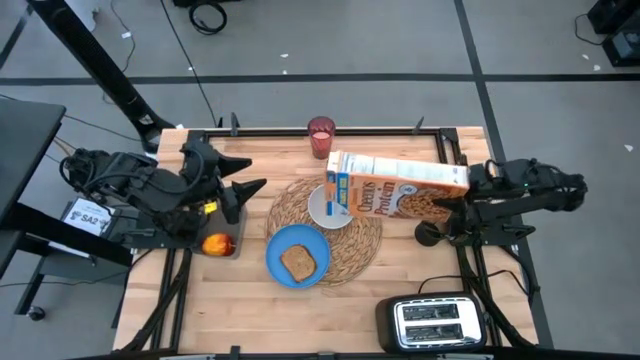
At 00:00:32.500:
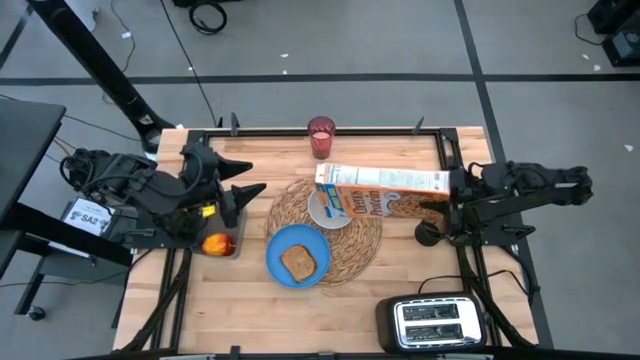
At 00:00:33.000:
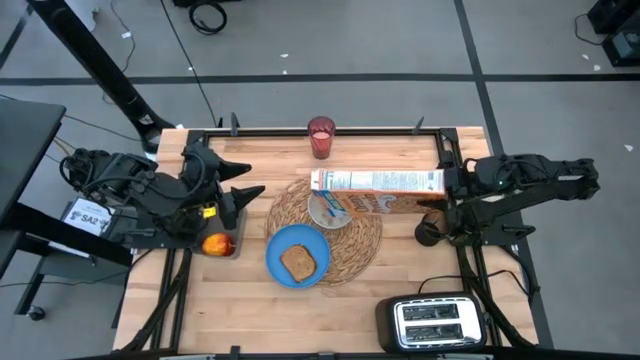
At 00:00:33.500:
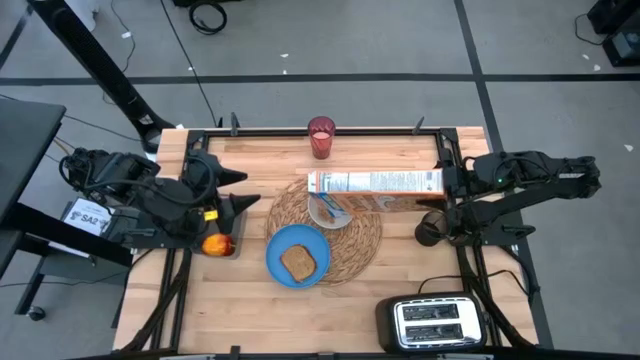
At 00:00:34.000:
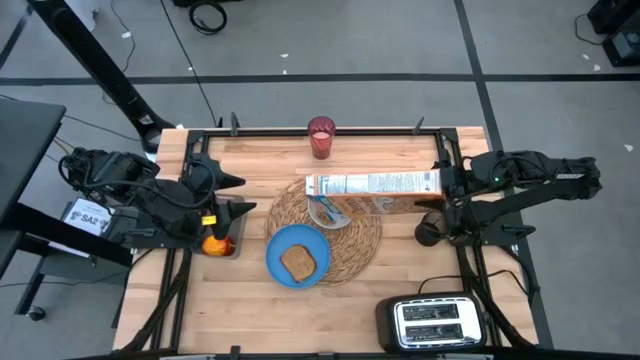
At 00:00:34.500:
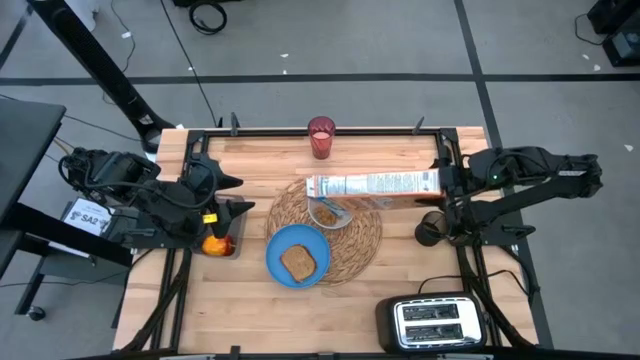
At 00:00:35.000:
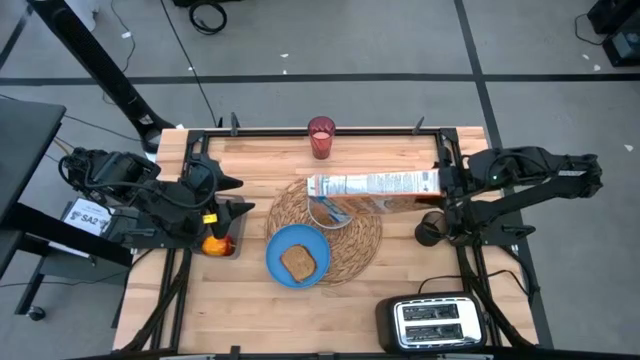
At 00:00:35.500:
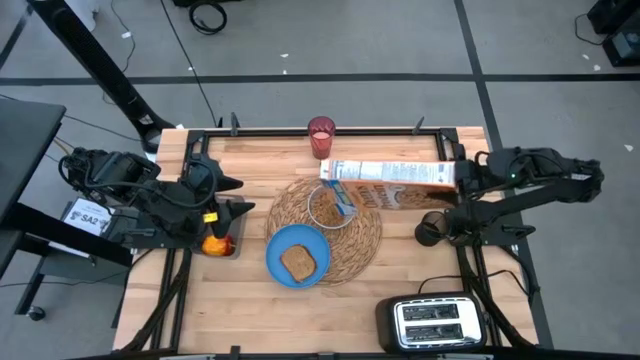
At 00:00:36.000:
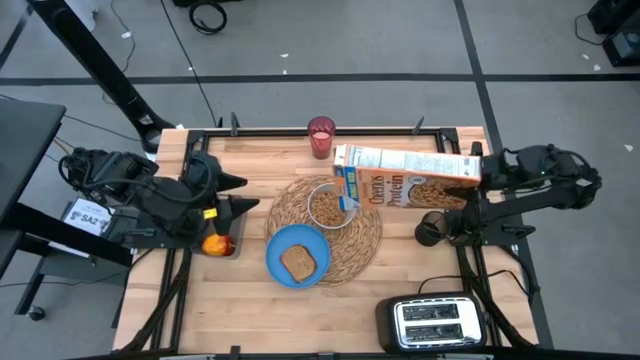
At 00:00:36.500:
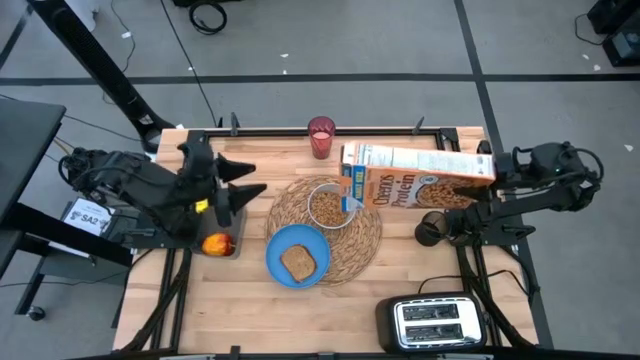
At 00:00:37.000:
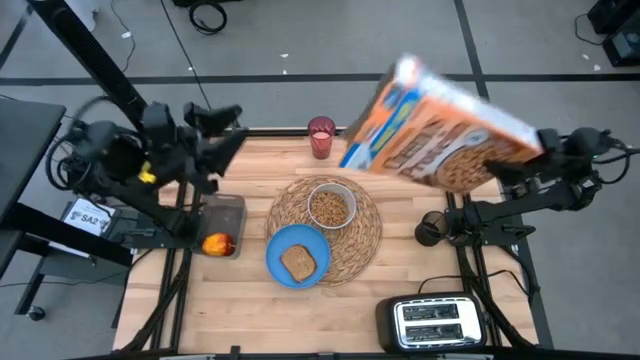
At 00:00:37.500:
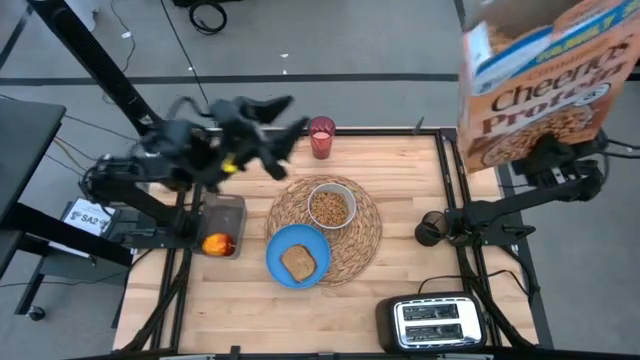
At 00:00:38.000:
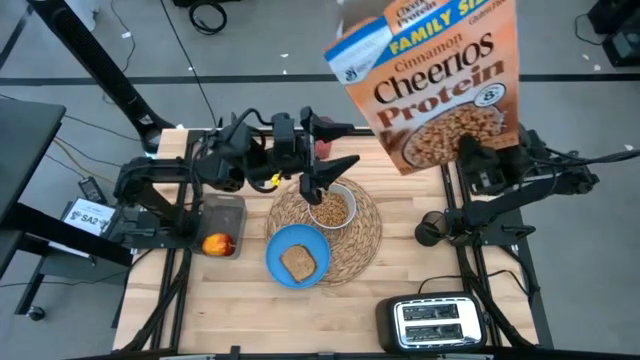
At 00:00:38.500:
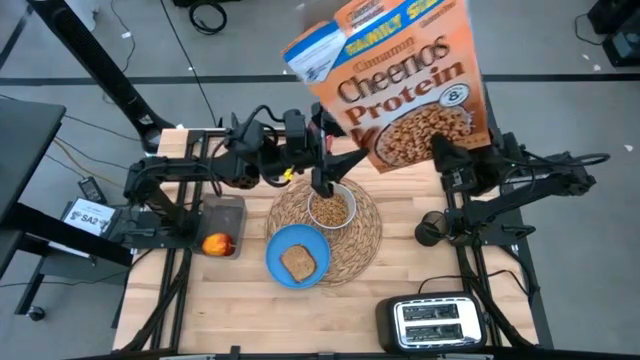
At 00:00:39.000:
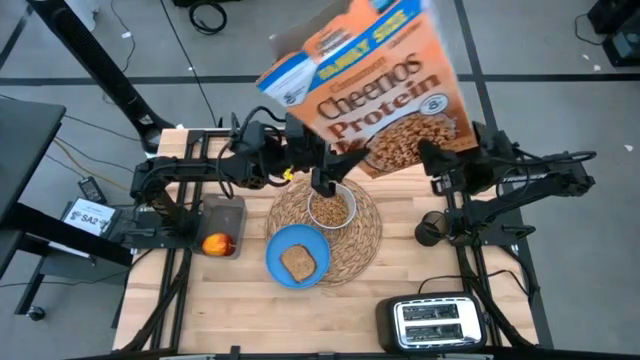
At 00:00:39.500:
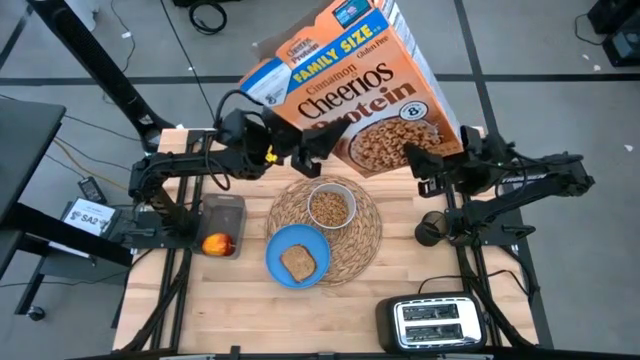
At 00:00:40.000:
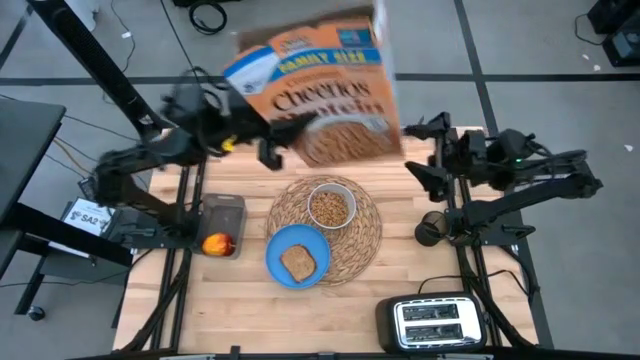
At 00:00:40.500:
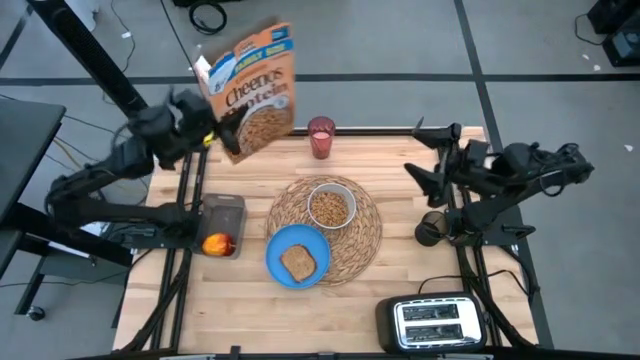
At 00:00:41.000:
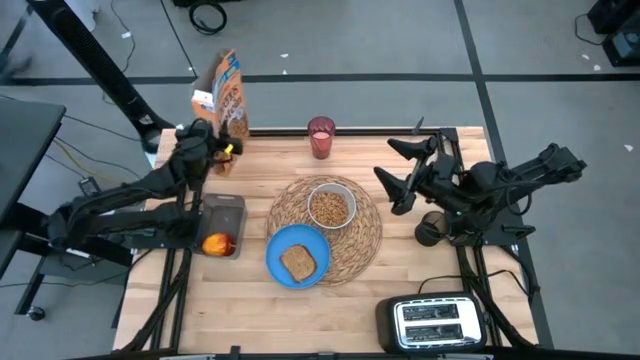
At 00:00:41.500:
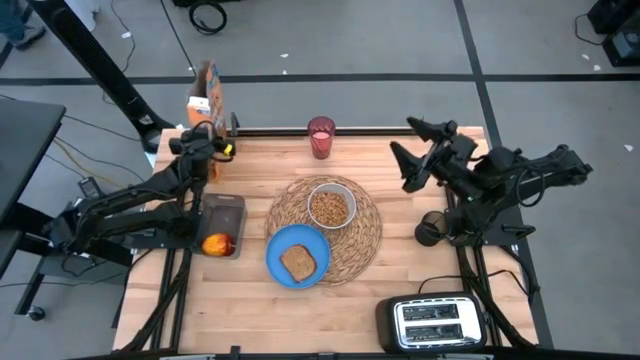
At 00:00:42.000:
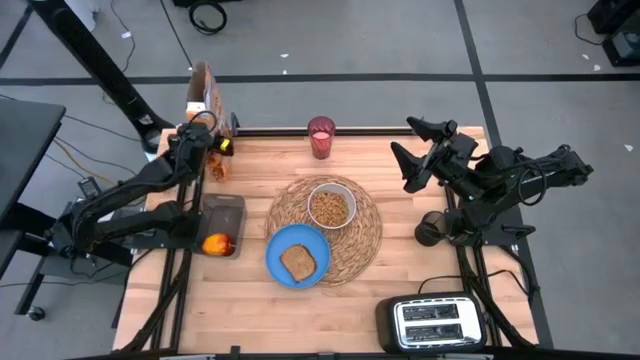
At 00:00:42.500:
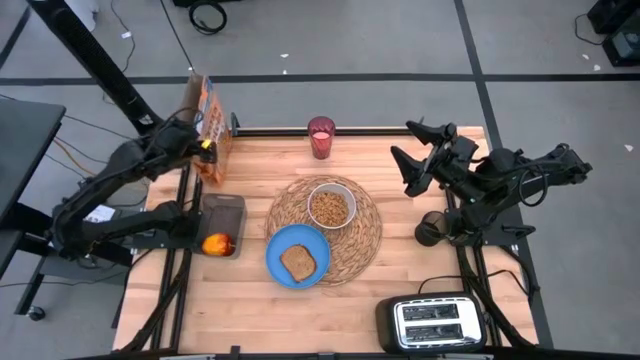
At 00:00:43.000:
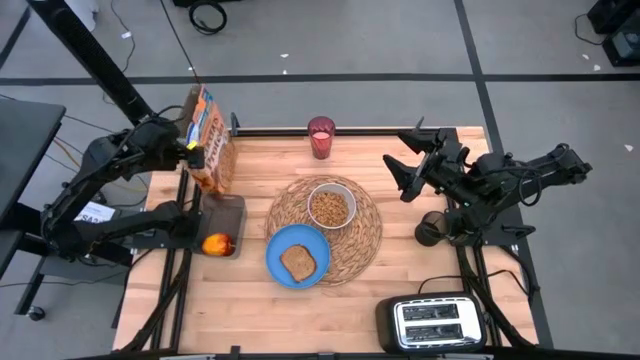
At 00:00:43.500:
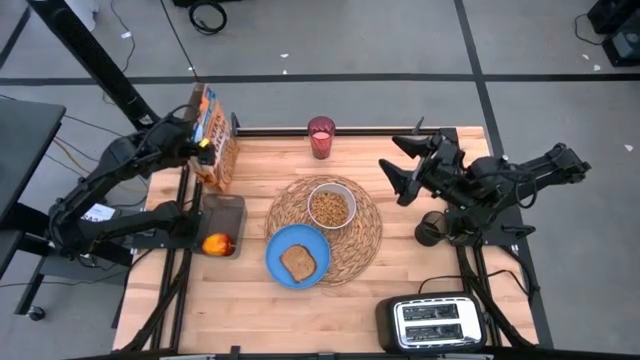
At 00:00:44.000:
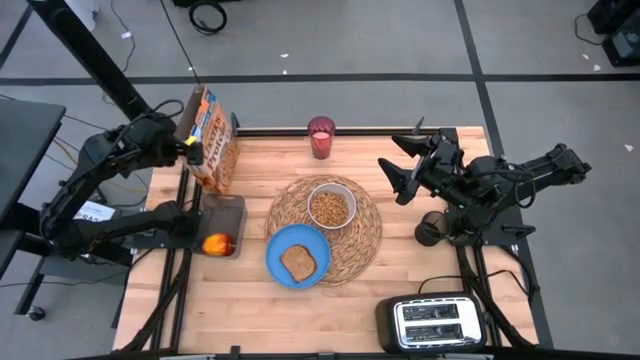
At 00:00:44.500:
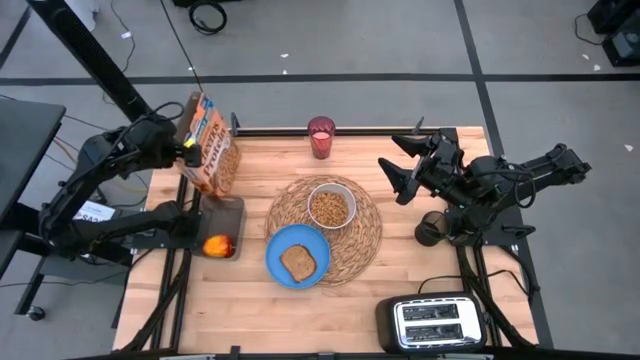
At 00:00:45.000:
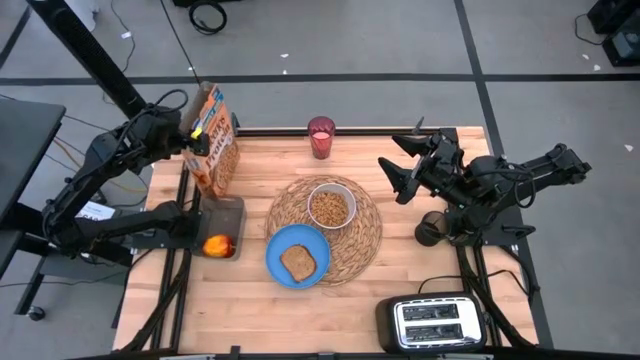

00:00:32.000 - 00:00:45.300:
Task: Arrange a breakfast setting
Pour the cereal from the cereal box into the bowl

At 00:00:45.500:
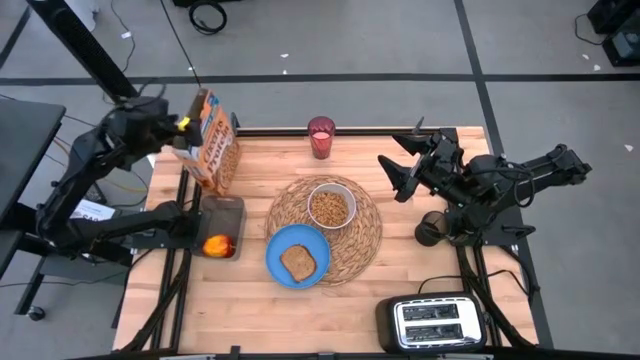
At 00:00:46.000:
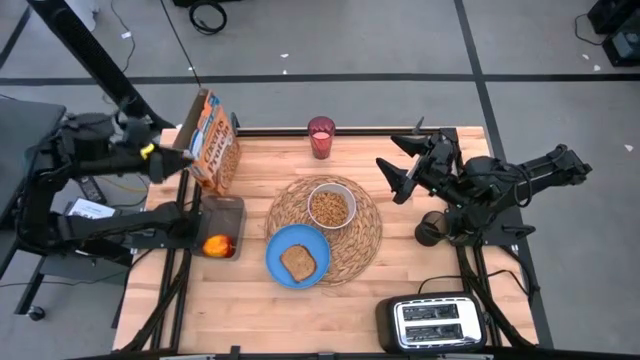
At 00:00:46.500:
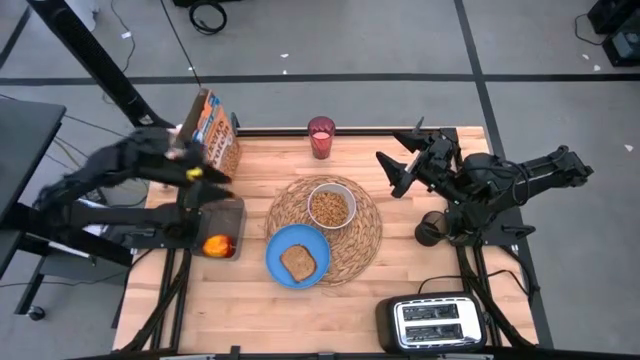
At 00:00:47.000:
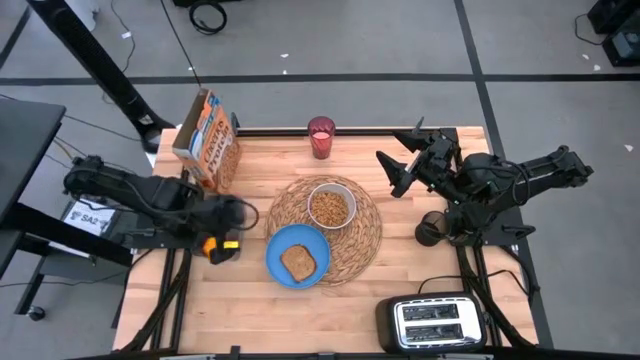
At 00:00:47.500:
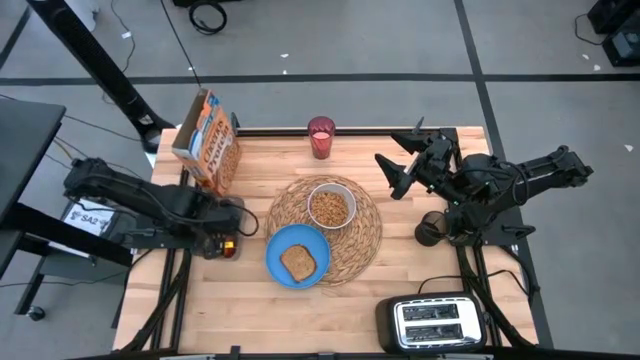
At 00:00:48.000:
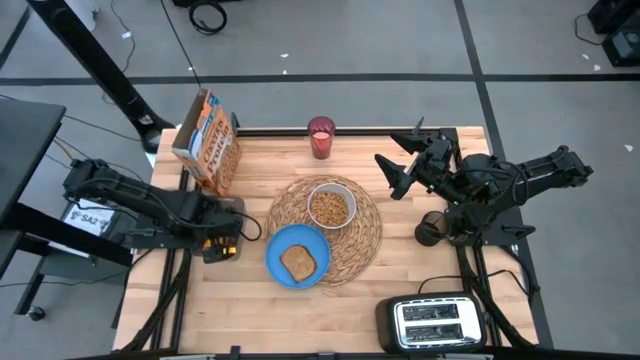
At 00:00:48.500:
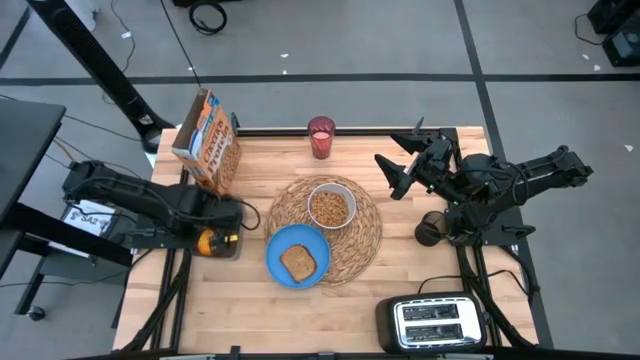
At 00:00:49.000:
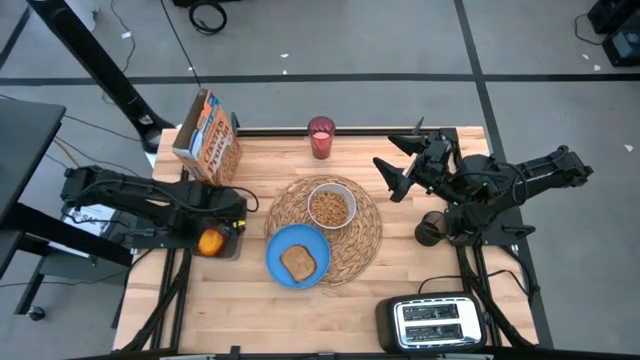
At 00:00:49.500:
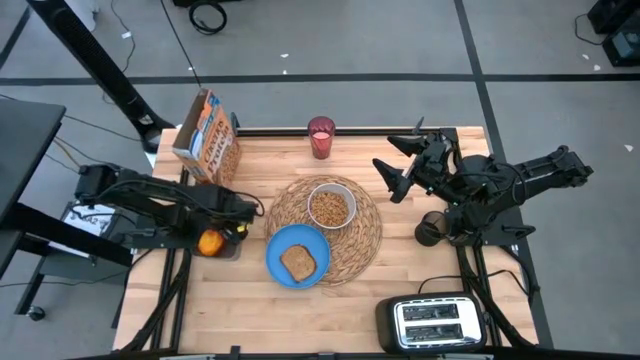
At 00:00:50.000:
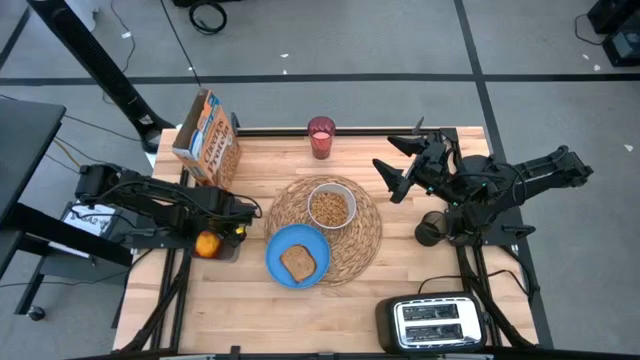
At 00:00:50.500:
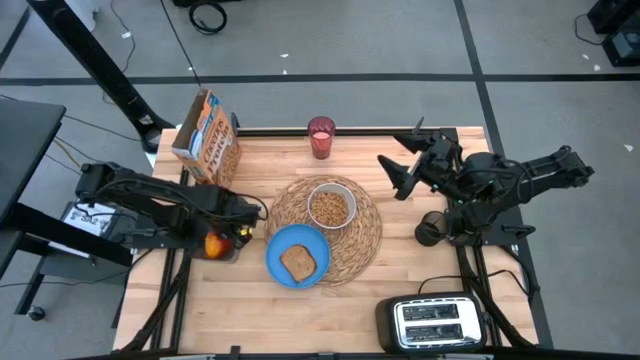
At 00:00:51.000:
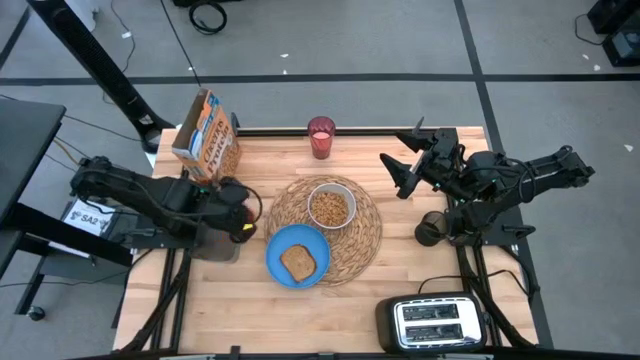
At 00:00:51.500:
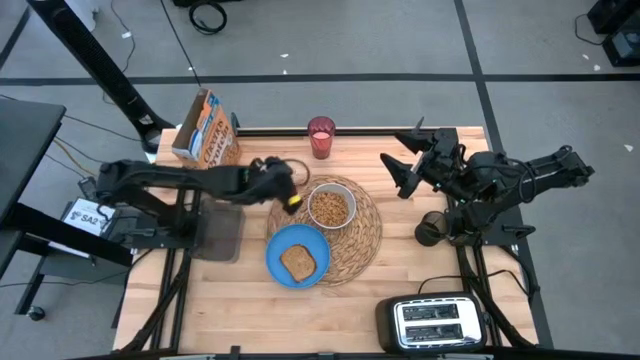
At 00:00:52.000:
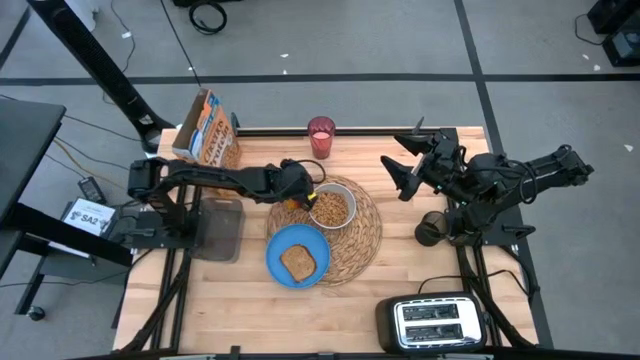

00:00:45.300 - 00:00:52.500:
Put the apple on the woven placemat to the left of the bowl
